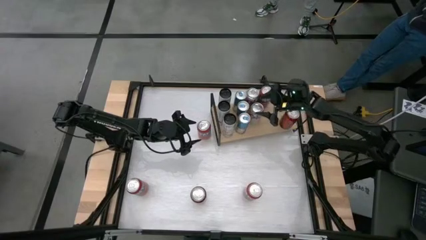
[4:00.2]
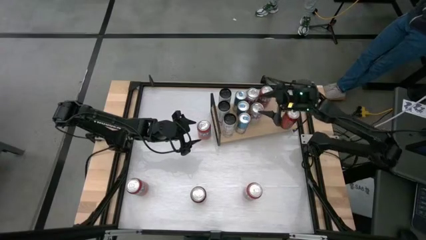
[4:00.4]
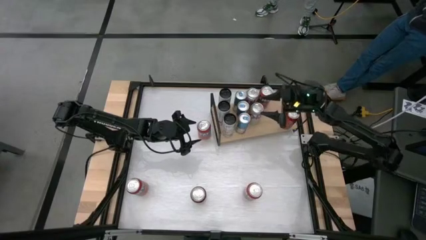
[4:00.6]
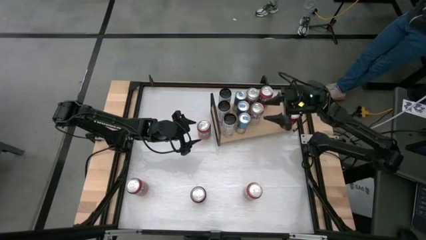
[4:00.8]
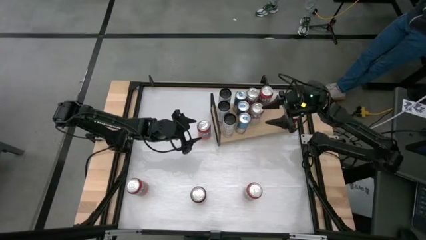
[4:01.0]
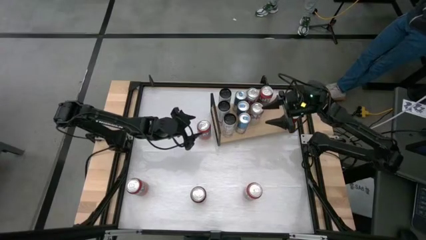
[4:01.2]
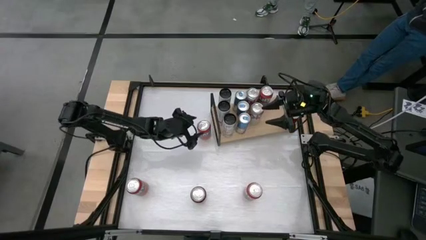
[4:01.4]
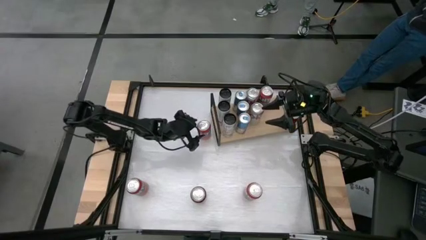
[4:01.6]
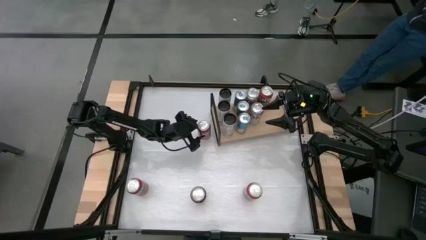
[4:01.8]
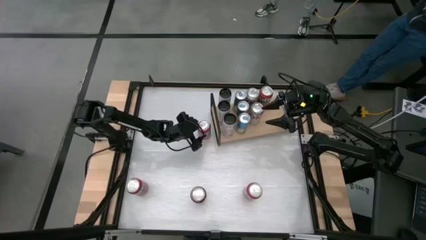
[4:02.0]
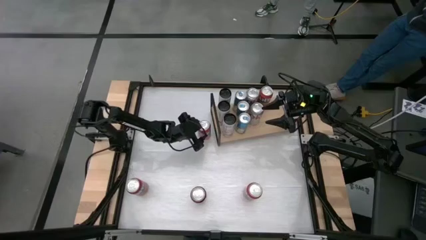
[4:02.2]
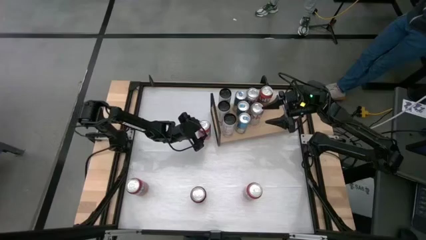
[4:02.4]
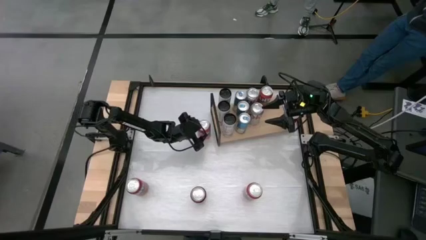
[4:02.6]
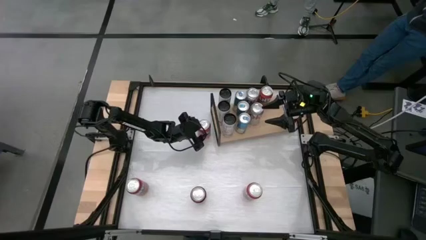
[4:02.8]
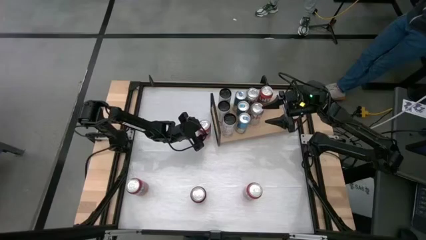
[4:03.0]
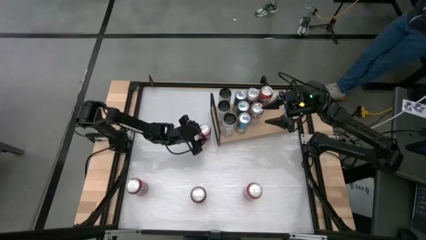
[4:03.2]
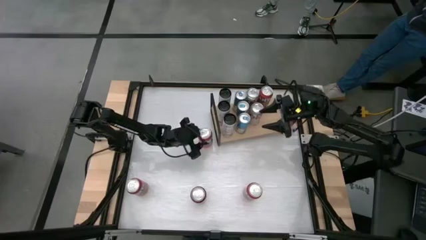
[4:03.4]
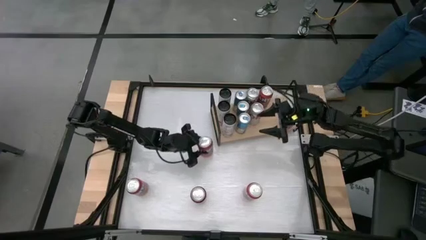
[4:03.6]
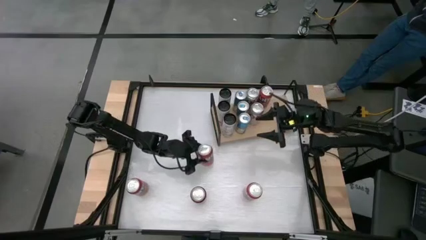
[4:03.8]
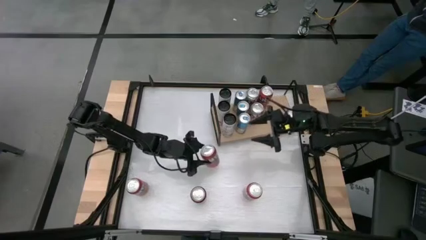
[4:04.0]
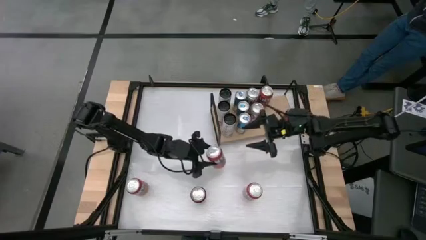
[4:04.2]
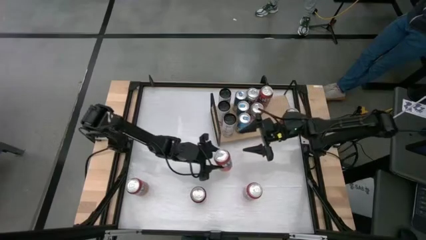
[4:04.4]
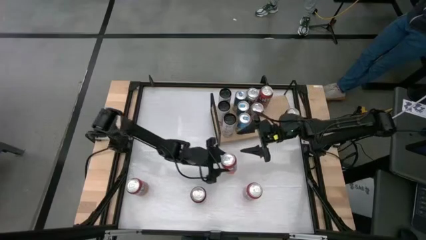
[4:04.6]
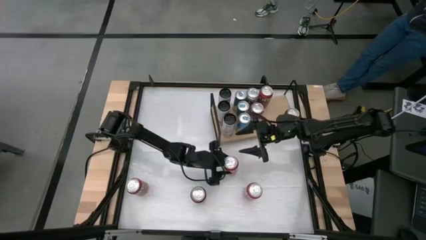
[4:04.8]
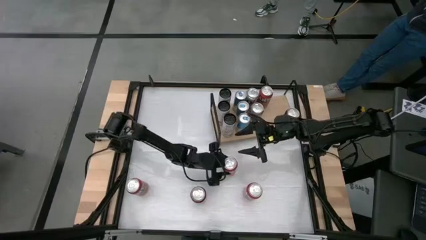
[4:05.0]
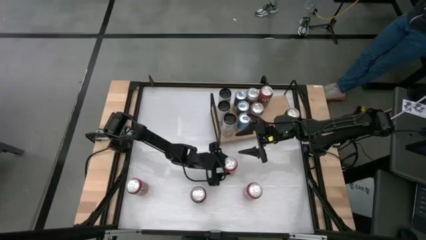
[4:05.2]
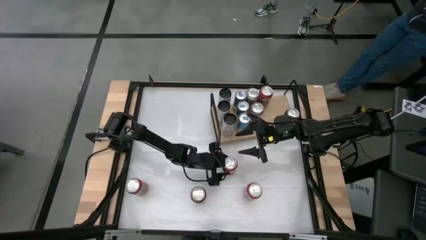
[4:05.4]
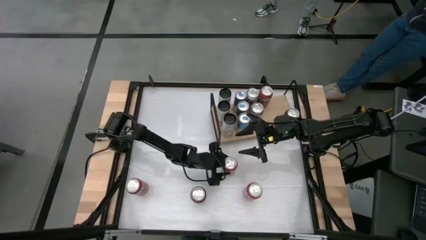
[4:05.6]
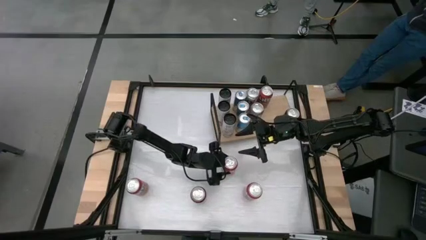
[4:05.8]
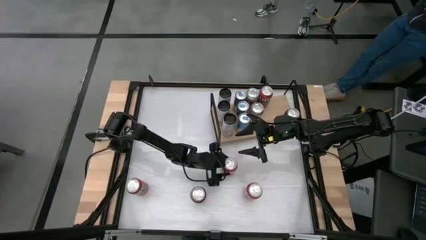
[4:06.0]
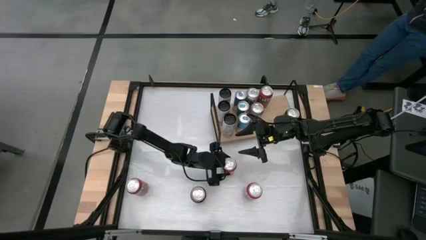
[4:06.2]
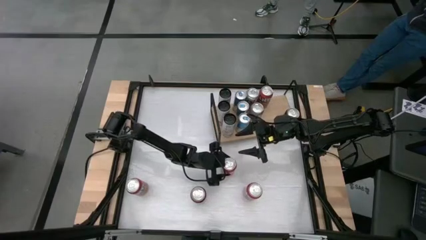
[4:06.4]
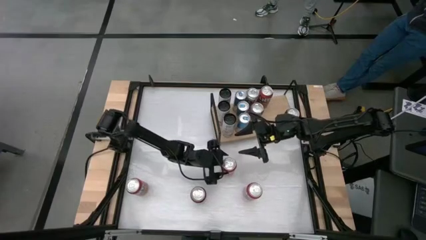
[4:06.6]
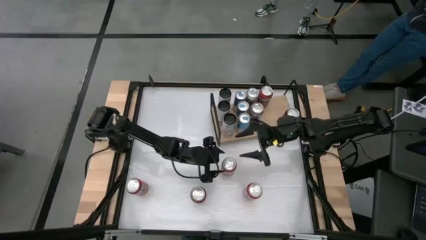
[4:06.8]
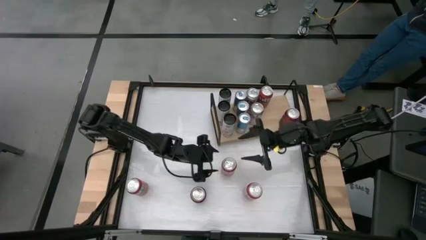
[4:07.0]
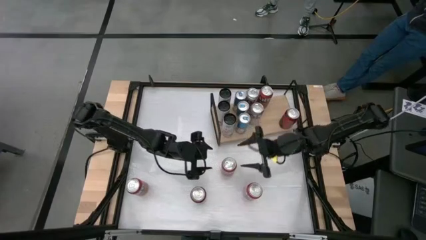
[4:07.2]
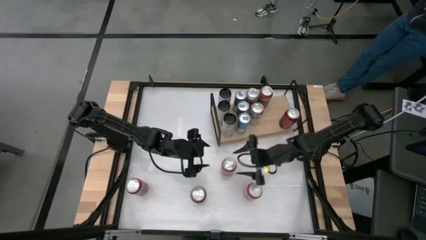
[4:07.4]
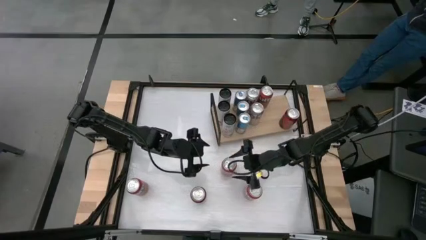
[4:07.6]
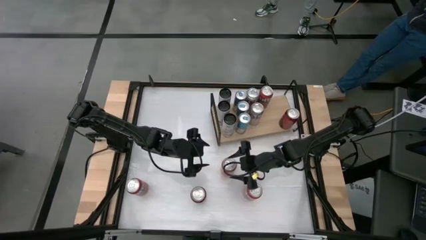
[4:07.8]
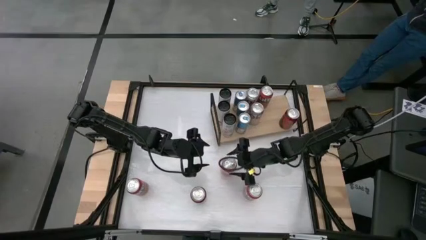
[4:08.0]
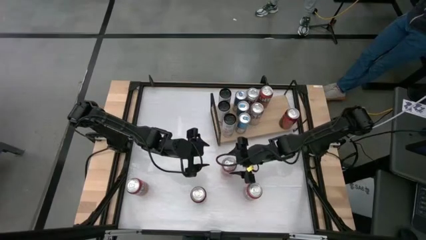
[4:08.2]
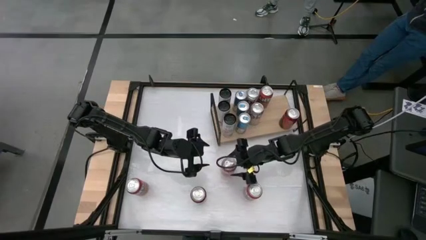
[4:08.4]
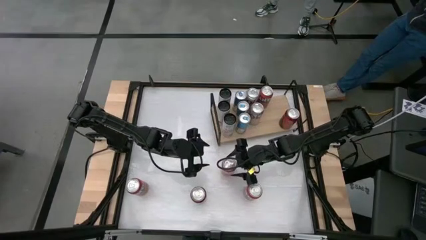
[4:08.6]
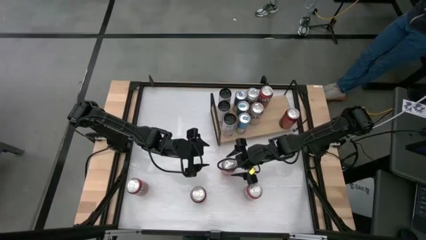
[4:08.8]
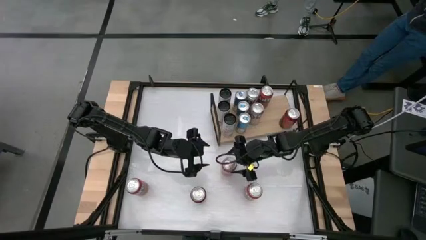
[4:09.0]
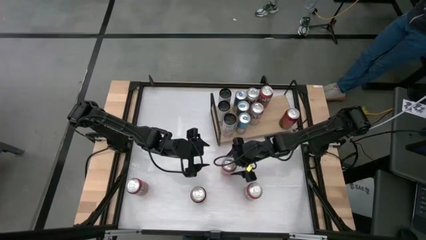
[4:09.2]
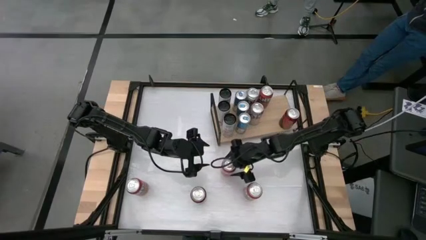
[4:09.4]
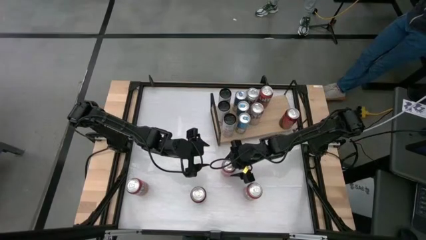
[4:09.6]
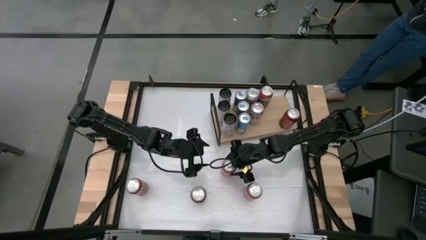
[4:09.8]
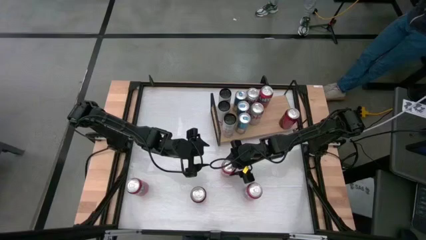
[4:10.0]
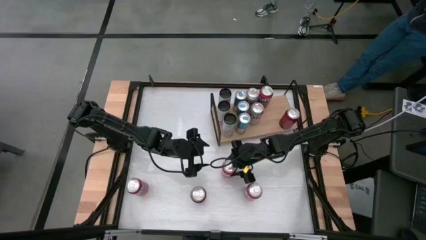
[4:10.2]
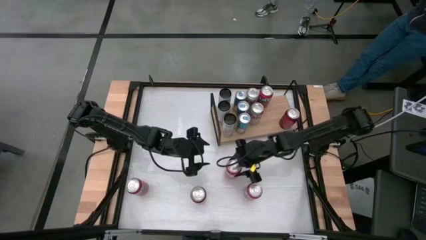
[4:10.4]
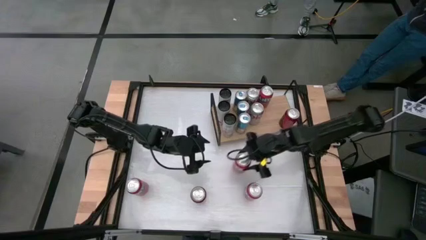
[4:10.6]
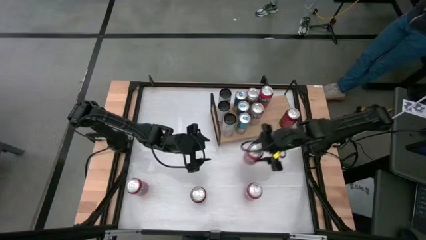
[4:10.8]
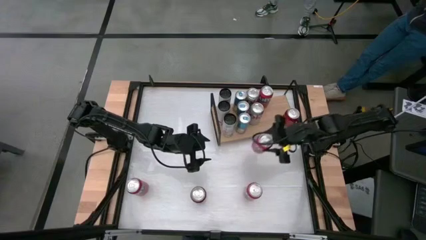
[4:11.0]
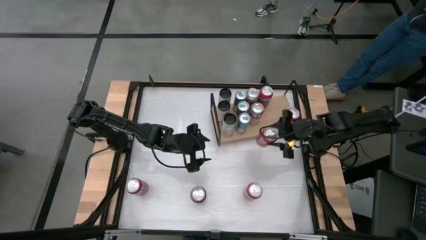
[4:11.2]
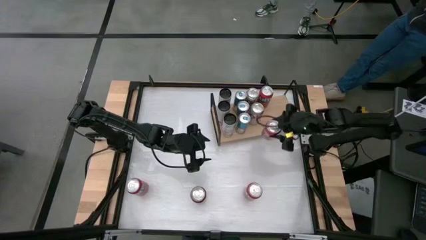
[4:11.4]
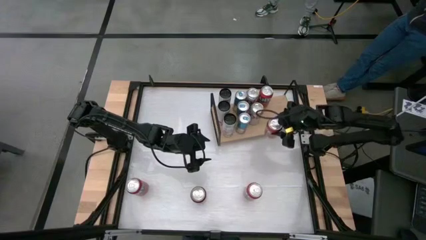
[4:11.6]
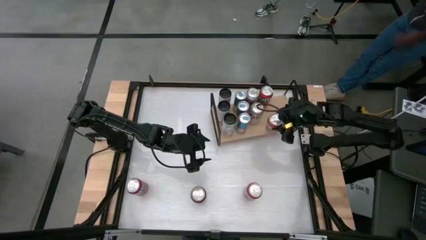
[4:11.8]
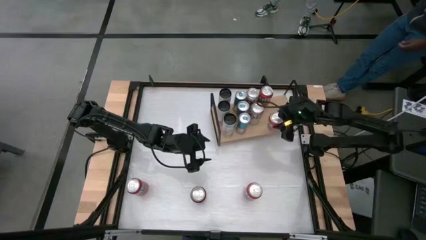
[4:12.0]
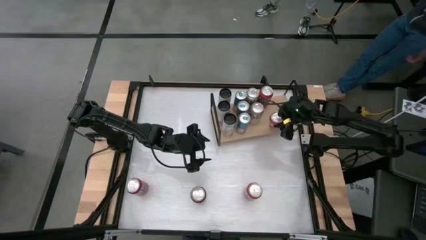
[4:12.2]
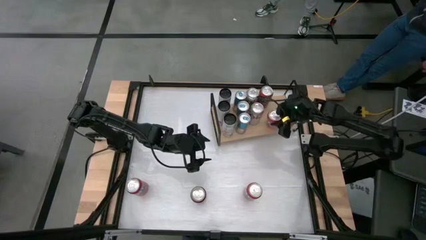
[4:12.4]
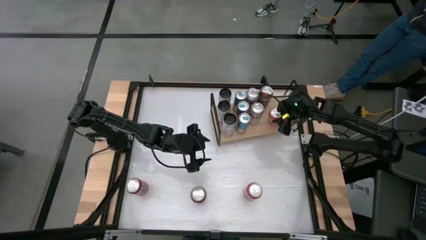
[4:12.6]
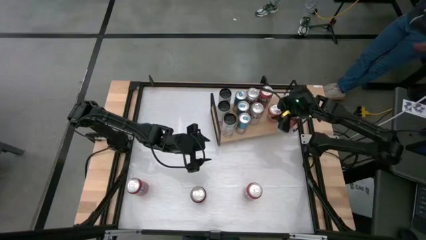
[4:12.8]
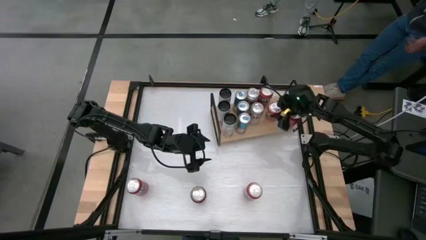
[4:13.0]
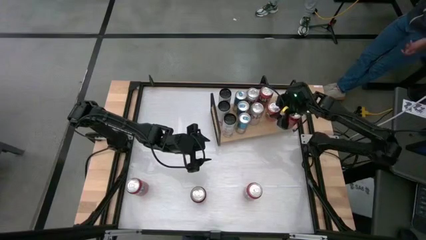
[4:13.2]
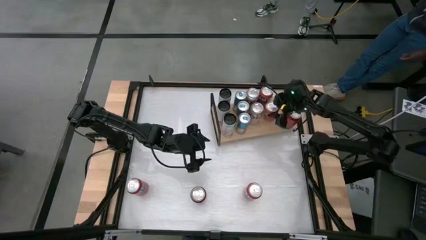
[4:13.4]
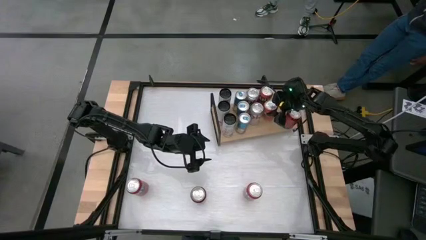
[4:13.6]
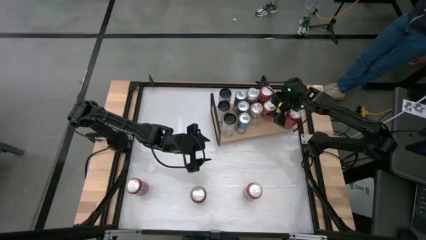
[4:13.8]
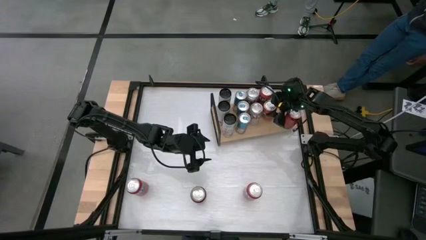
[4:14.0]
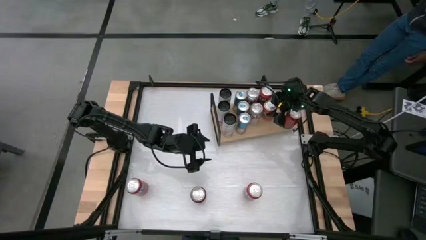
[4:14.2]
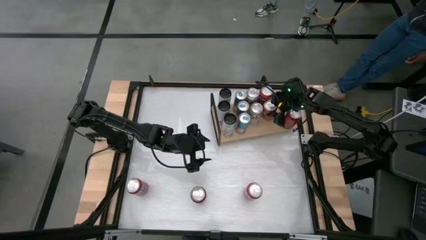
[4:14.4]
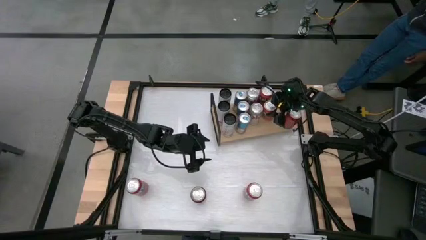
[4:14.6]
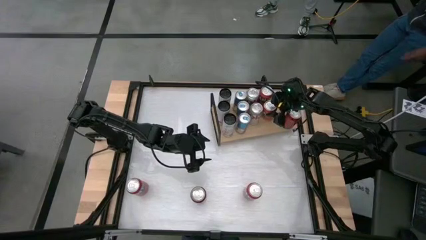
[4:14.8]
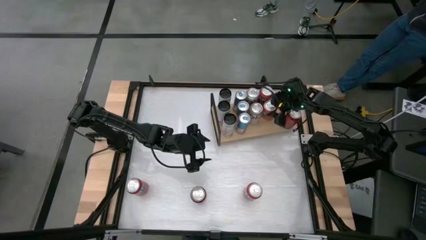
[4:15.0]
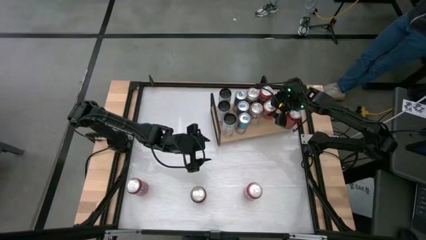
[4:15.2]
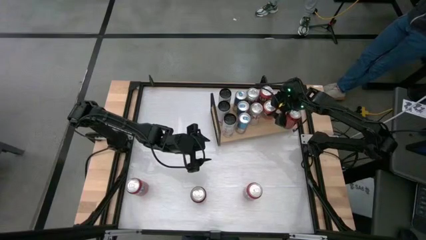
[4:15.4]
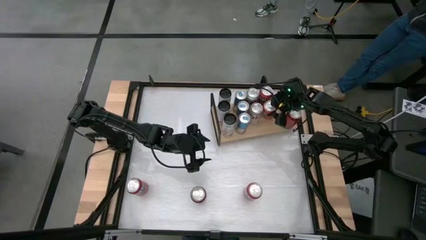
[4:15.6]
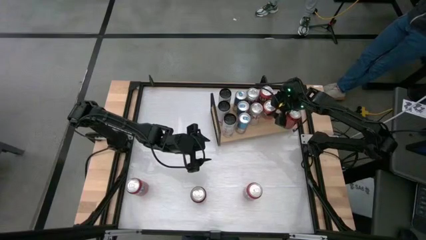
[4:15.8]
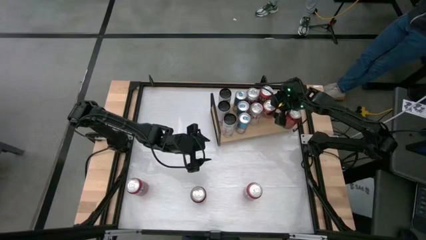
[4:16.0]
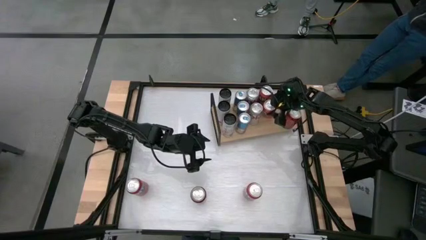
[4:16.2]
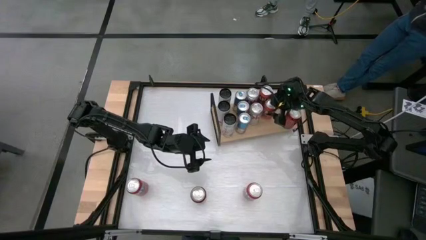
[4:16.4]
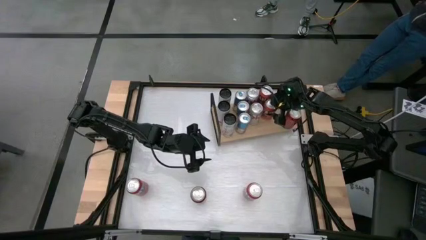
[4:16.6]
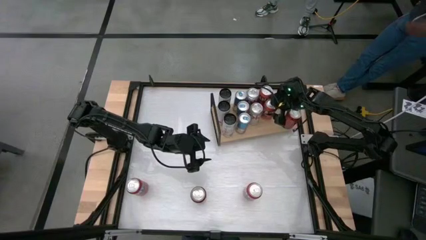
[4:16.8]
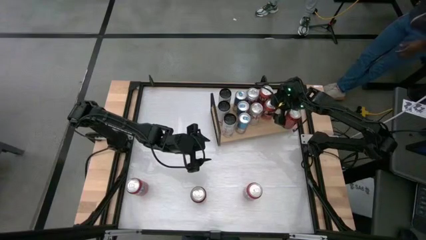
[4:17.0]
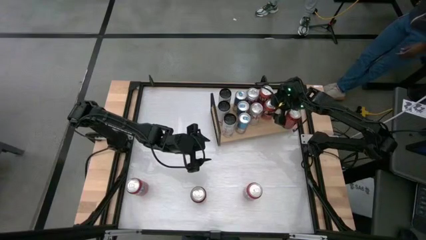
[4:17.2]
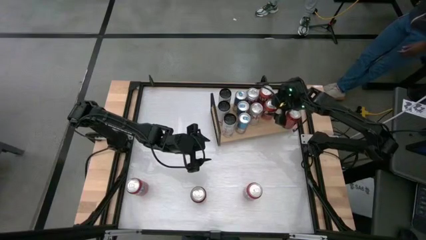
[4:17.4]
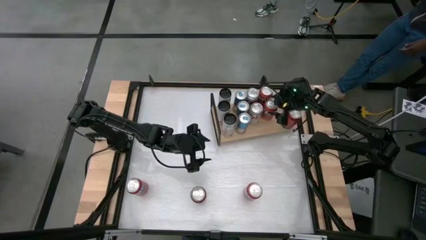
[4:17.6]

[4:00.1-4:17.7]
Task: Place canned beverage on shelf
Put the orange soda can on the shelf aligned with the other orange soda can
